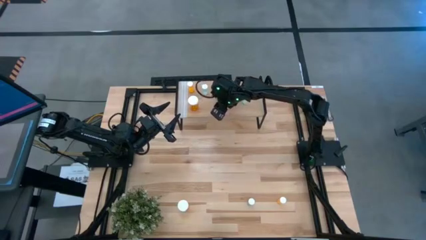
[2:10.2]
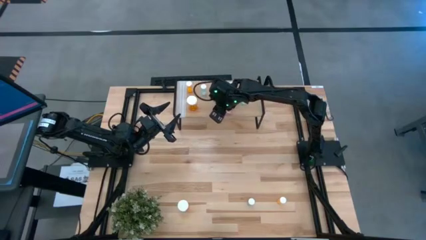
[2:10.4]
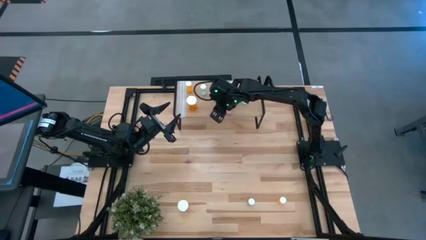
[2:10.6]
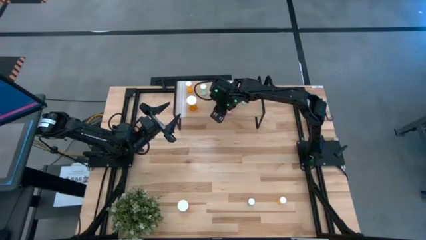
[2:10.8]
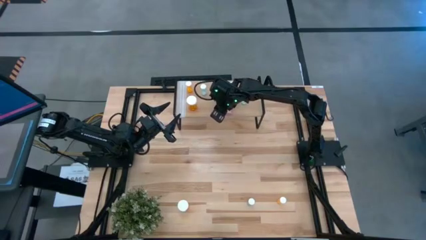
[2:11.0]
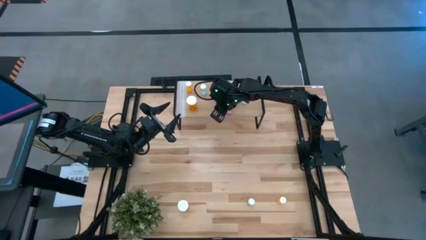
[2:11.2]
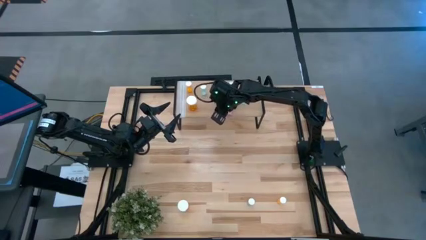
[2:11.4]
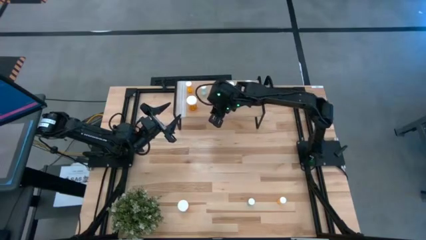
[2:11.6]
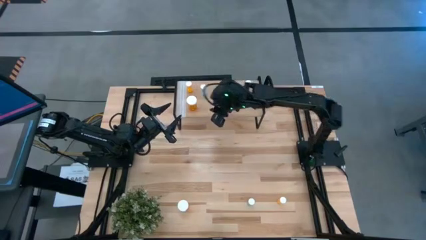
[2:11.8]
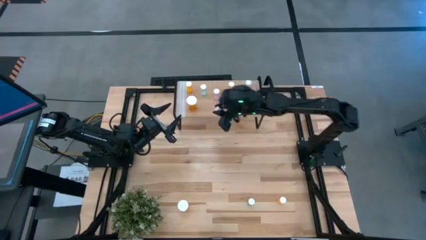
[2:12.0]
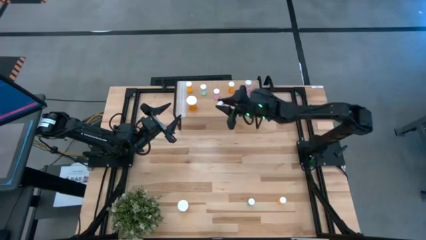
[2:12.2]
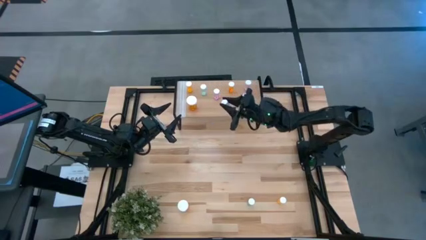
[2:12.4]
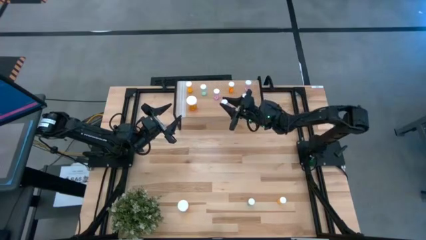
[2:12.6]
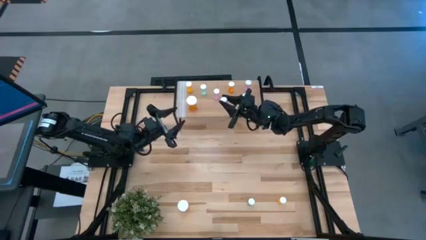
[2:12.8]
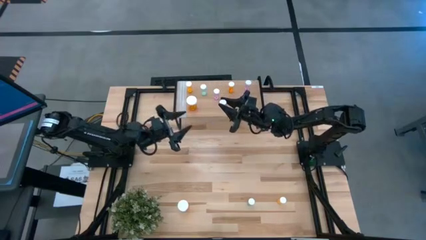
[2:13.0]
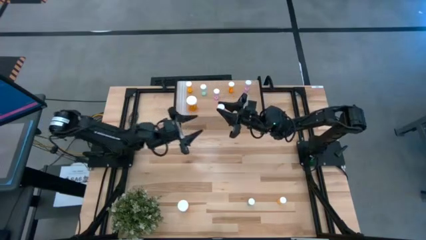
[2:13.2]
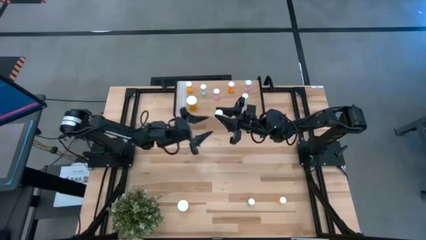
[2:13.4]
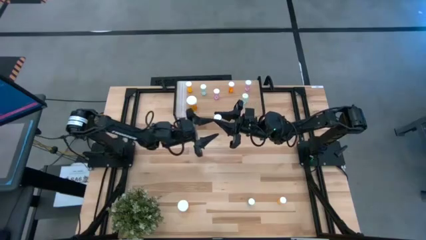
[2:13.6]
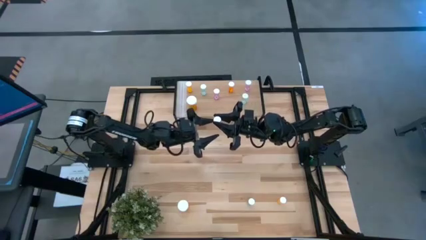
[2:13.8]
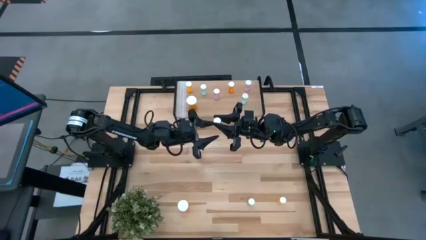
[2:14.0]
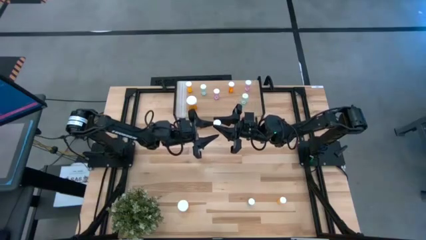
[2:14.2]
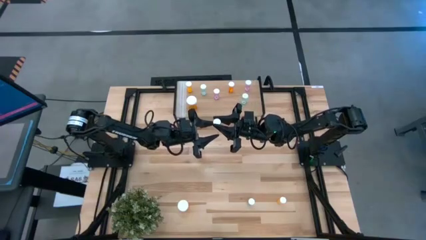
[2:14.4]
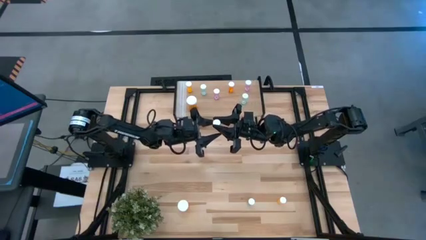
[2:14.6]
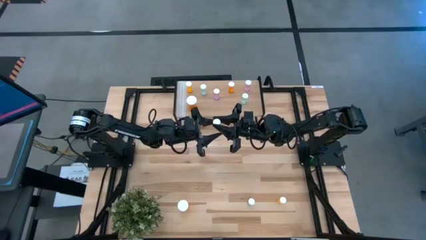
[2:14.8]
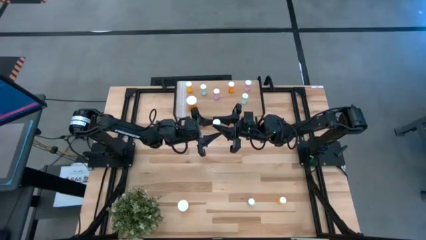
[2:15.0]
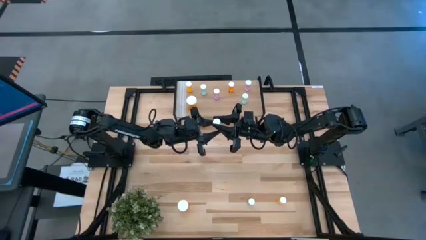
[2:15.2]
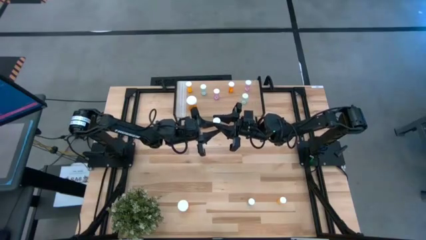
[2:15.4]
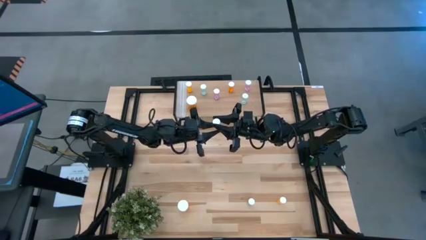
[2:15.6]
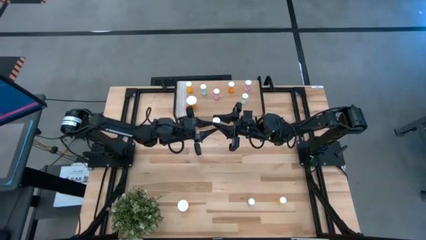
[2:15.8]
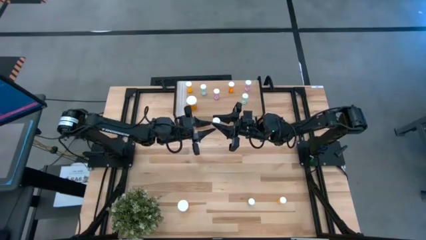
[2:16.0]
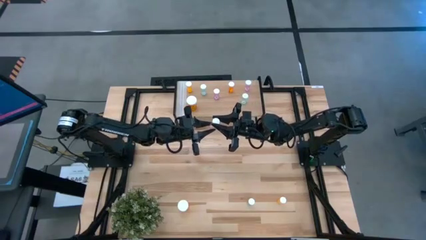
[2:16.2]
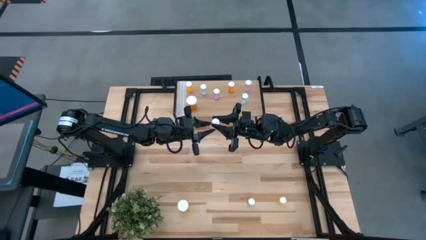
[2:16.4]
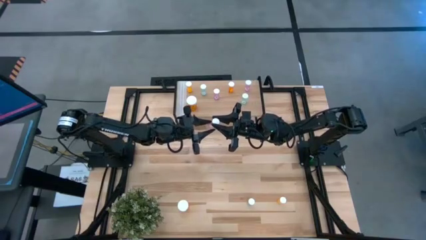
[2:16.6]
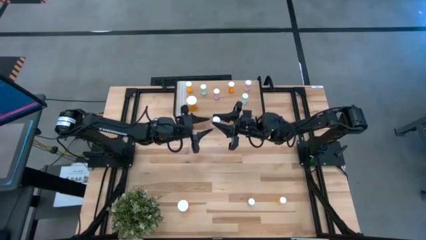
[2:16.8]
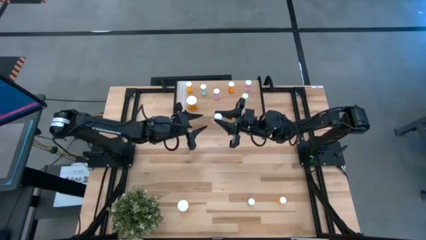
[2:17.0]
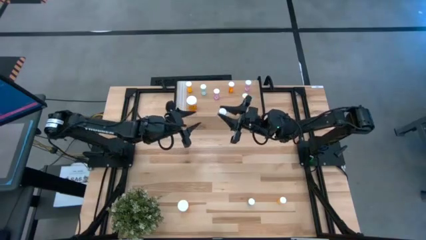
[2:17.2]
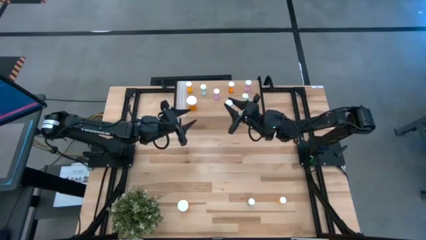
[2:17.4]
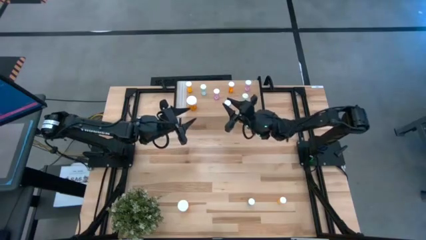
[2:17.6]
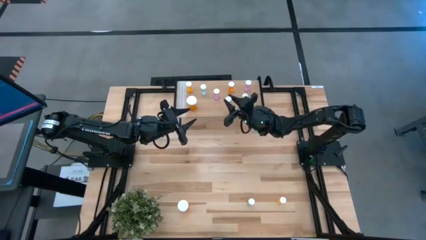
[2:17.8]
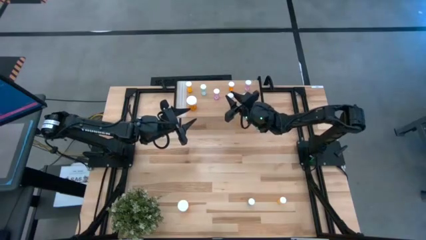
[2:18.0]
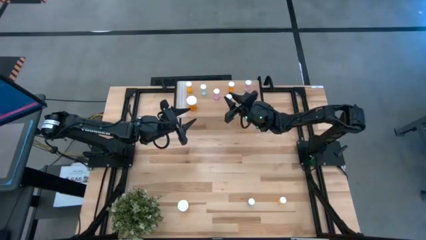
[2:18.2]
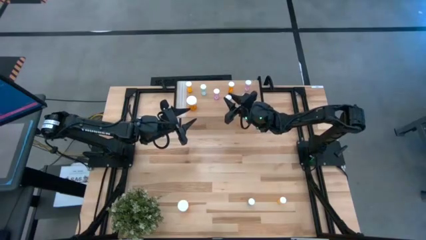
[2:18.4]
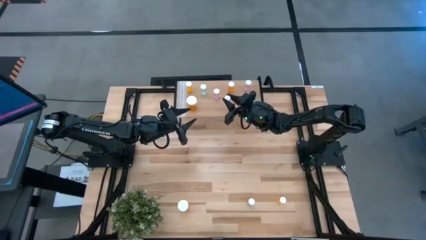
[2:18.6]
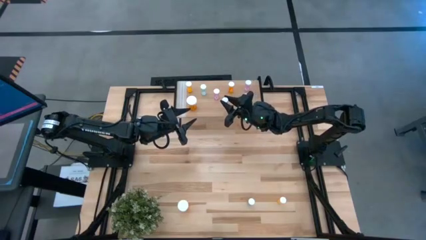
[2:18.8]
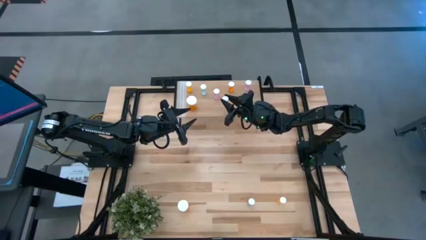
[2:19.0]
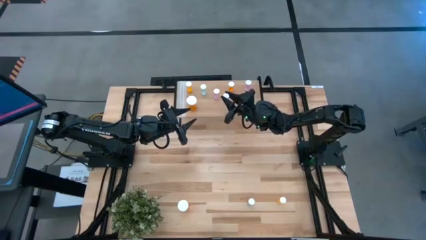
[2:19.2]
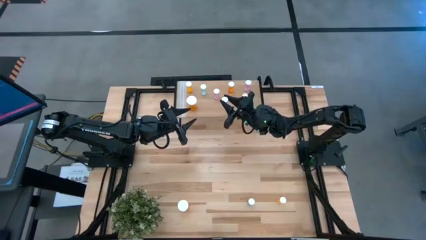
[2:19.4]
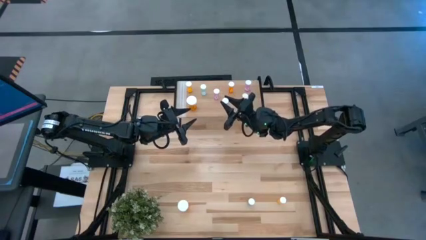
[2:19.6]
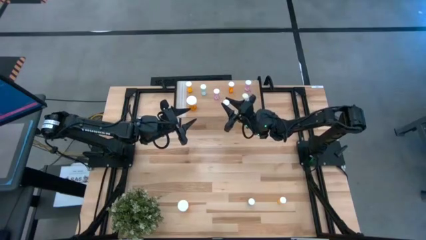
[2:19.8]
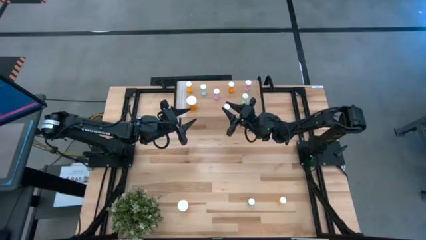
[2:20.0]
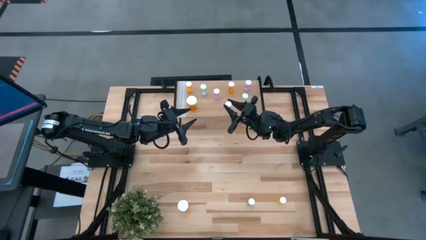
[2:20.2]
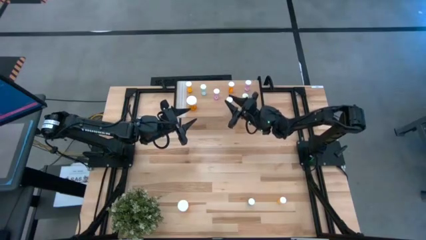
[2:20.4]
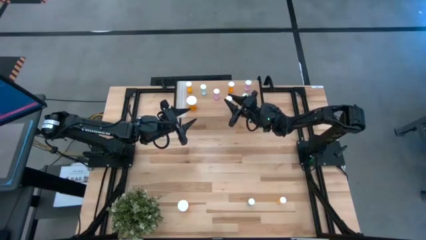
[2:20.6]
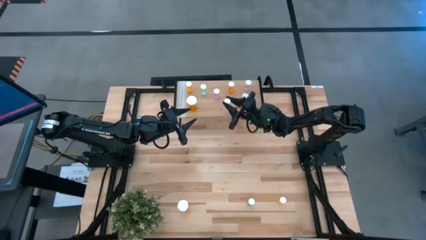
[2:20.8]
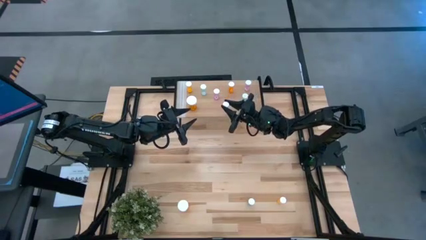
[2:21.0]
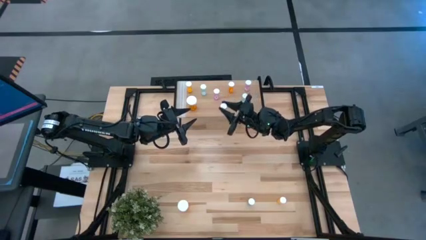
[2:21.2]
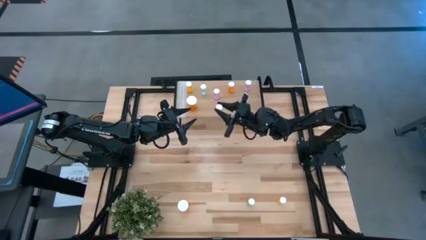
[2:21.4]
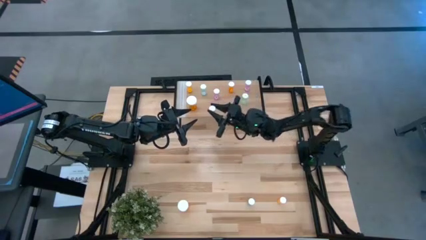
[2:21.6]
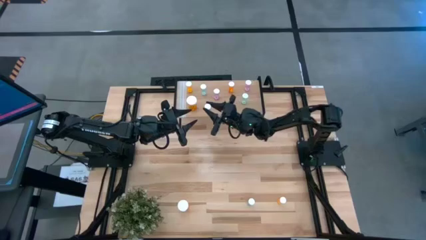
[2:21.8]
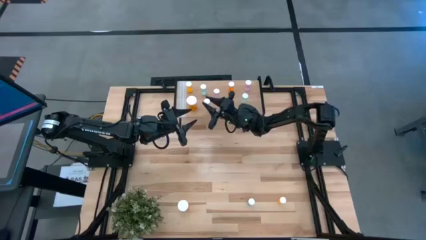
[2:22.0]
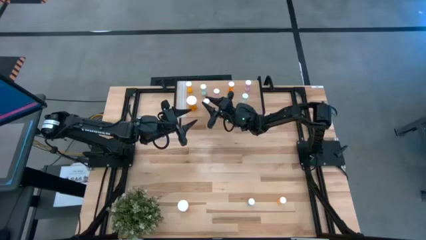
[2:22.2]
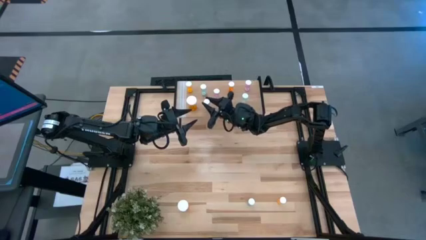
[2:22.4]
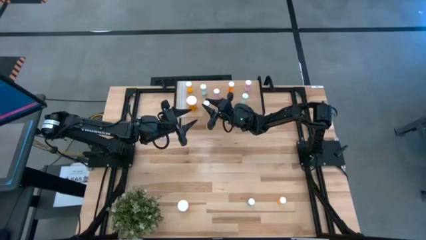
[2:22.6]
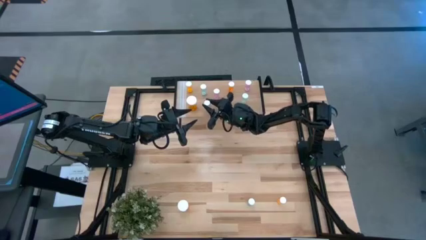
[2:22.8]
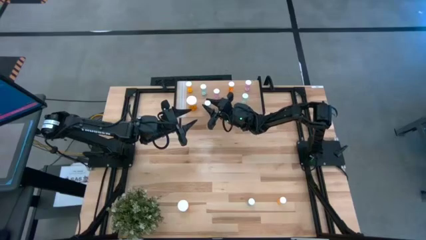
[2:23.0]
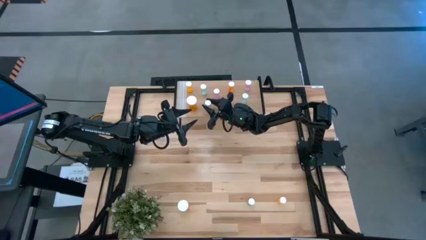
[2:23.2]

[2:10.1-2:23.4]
Task: Pick and place medicine bottles onto shelf by color
Put the pink small pill bottle on the shelf
